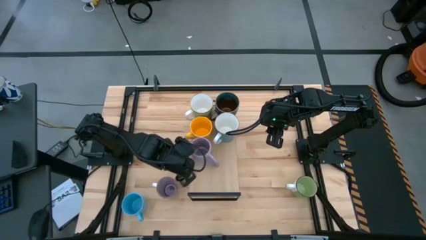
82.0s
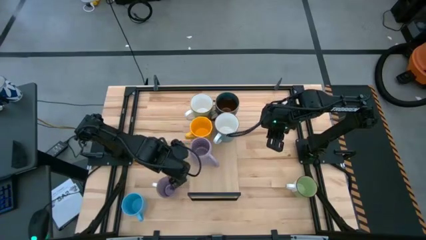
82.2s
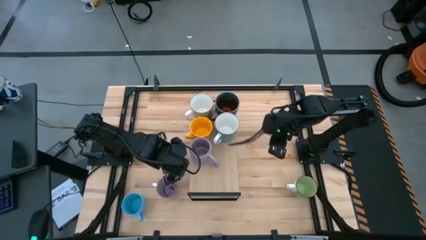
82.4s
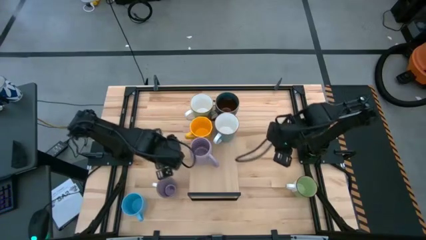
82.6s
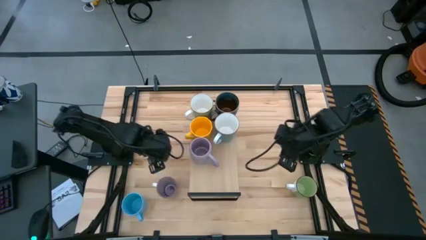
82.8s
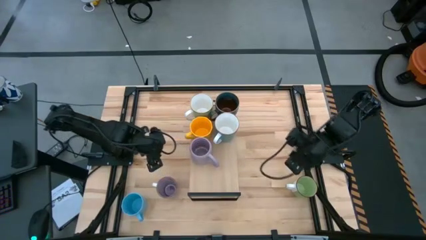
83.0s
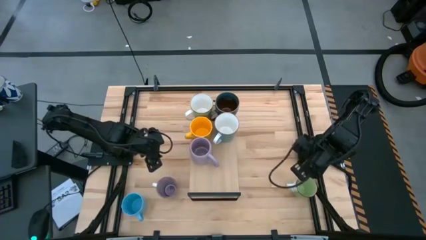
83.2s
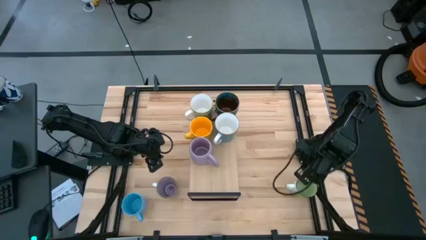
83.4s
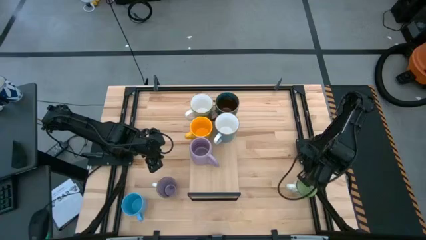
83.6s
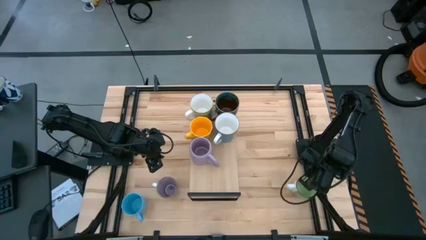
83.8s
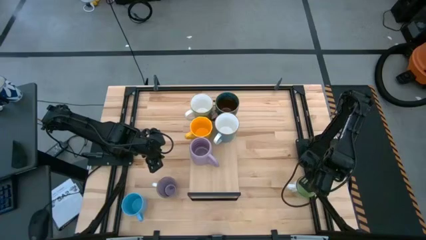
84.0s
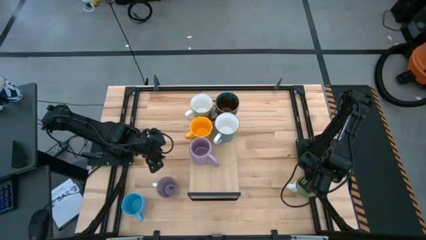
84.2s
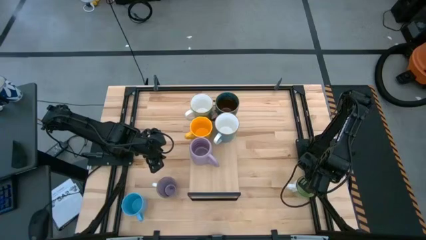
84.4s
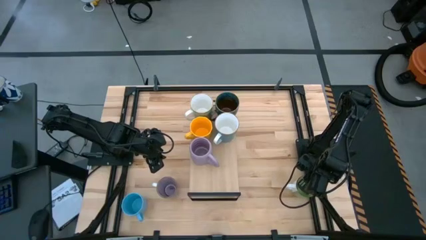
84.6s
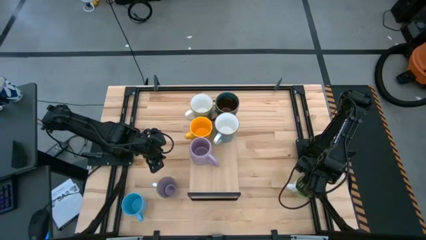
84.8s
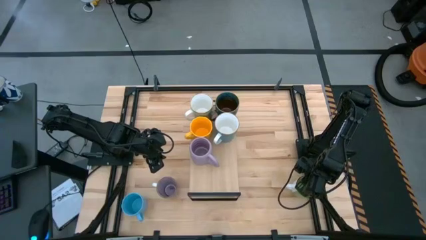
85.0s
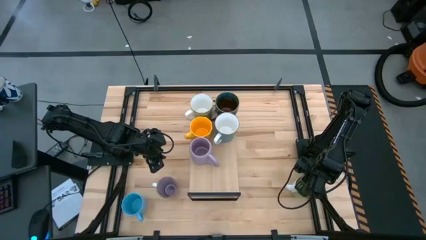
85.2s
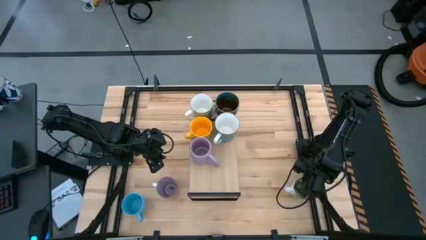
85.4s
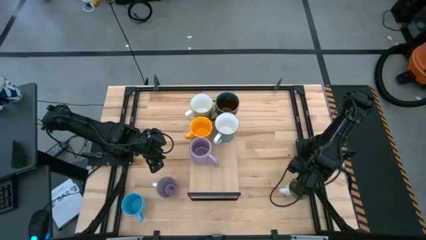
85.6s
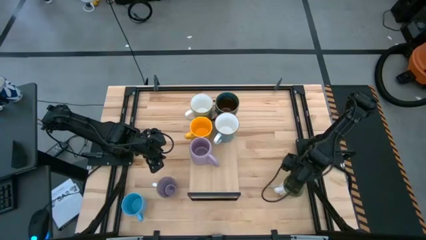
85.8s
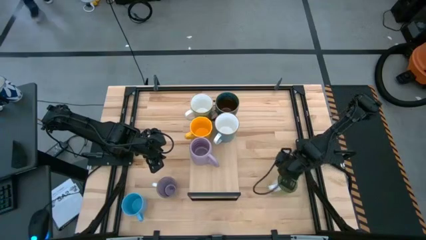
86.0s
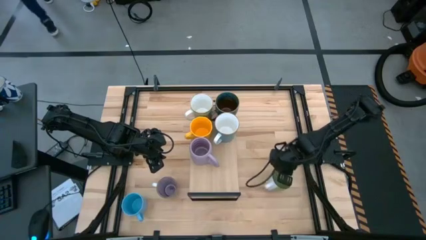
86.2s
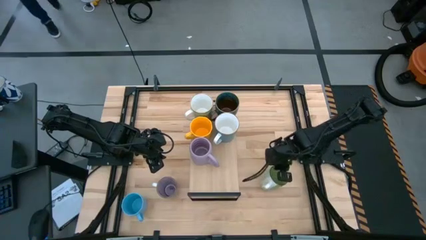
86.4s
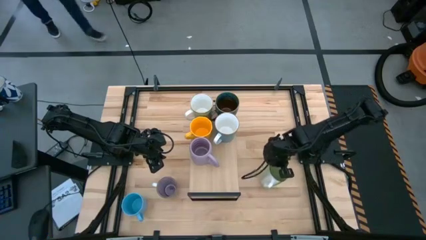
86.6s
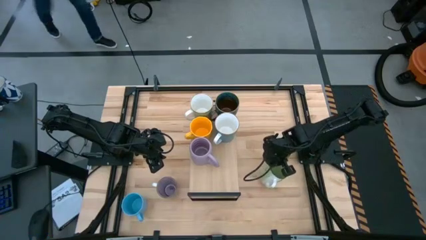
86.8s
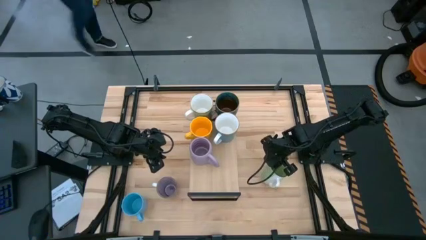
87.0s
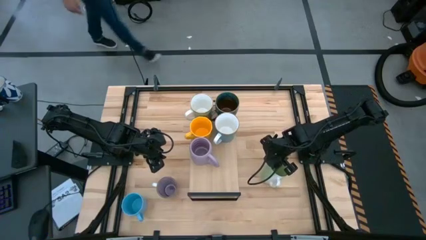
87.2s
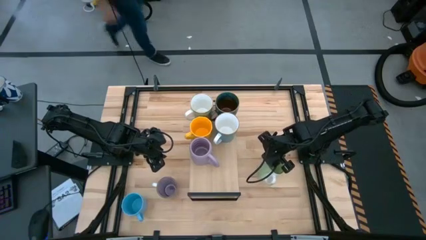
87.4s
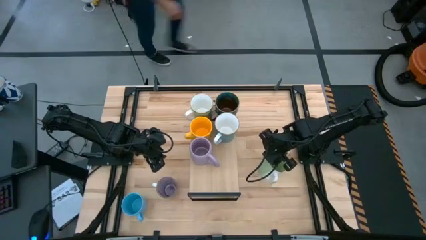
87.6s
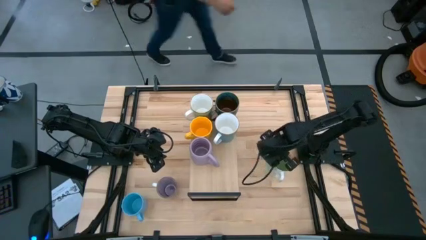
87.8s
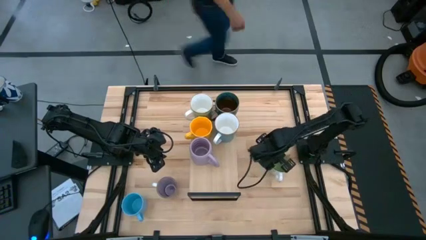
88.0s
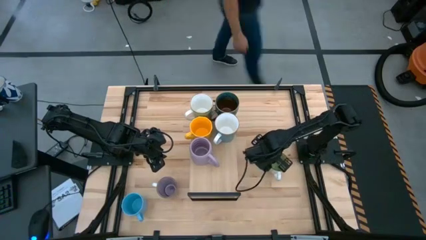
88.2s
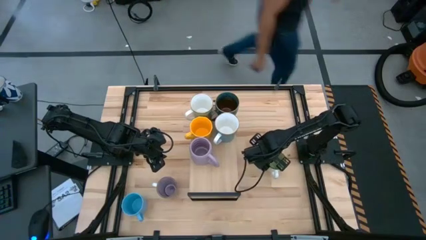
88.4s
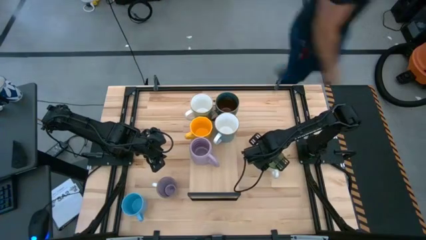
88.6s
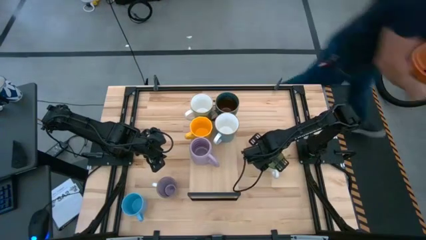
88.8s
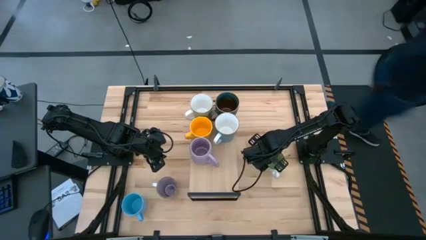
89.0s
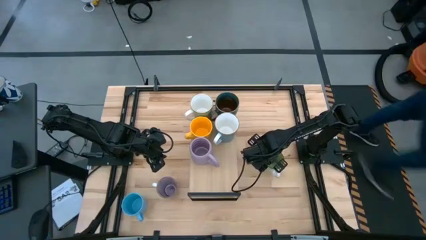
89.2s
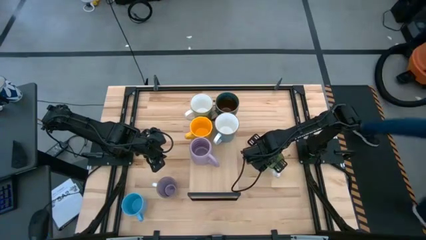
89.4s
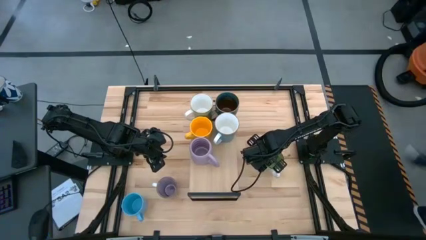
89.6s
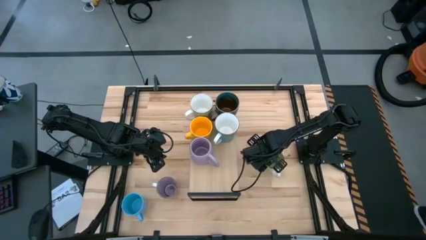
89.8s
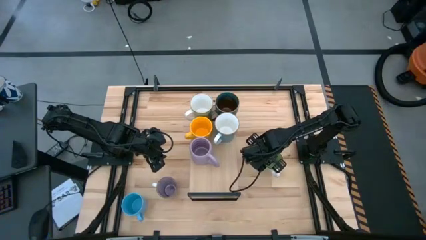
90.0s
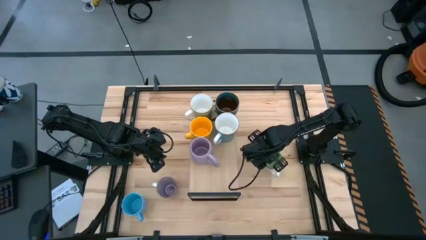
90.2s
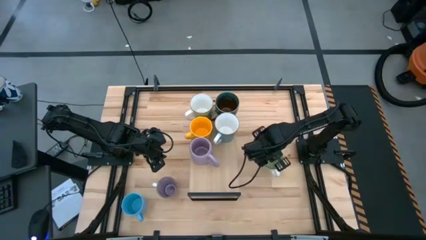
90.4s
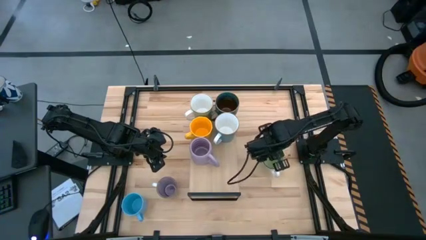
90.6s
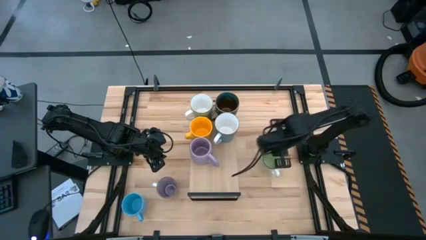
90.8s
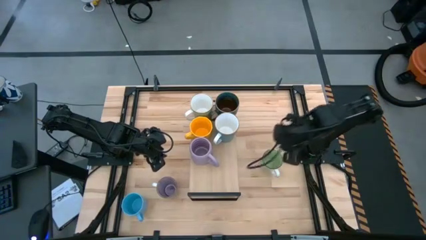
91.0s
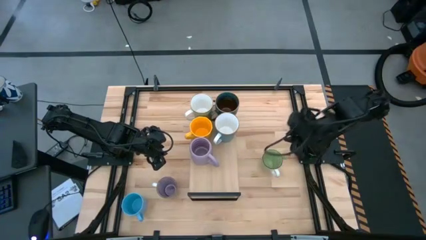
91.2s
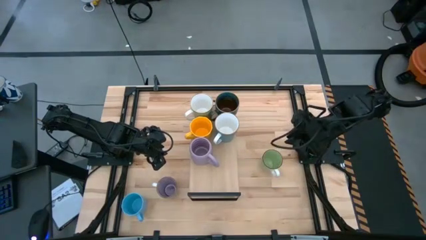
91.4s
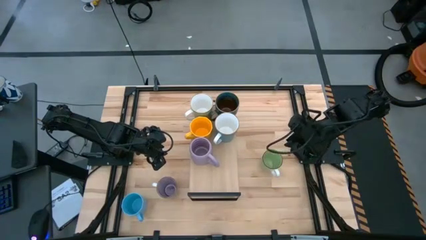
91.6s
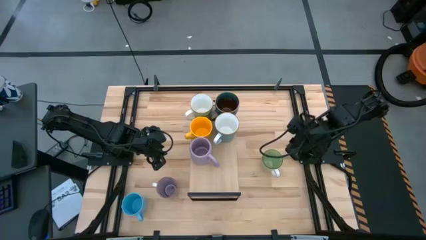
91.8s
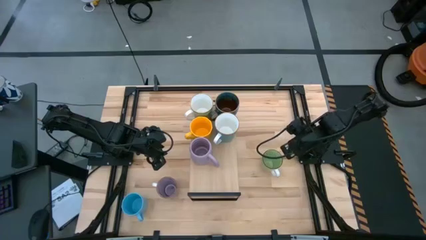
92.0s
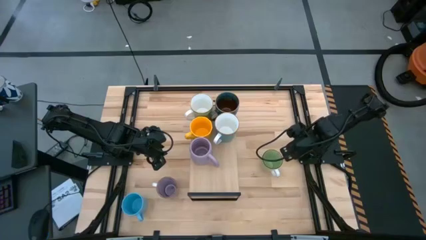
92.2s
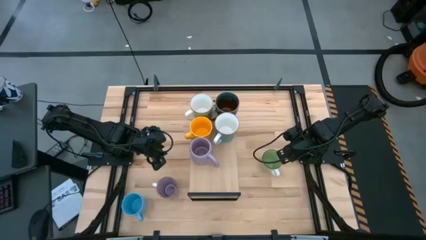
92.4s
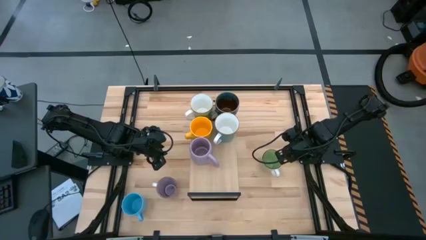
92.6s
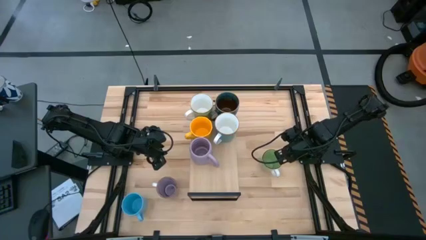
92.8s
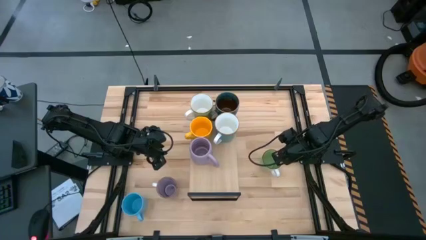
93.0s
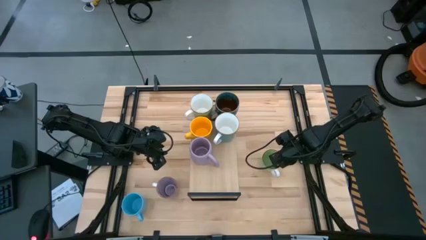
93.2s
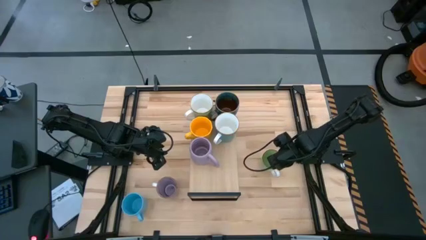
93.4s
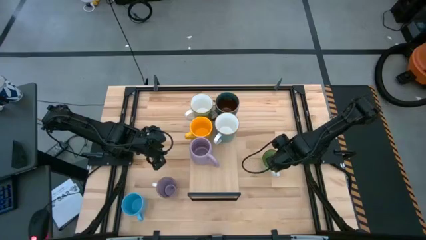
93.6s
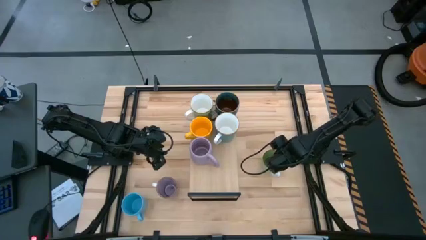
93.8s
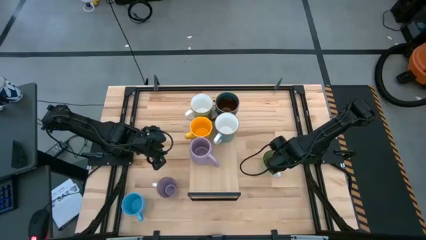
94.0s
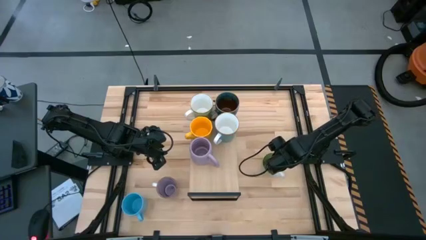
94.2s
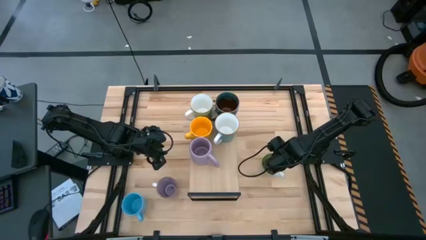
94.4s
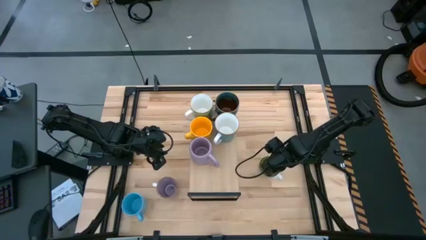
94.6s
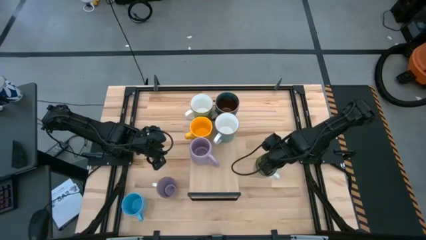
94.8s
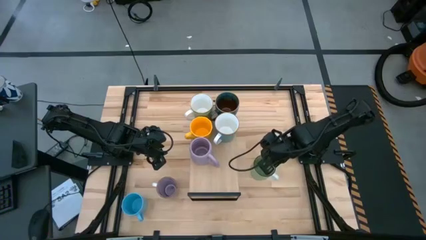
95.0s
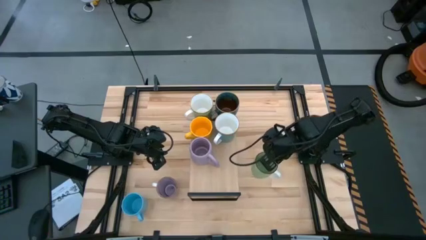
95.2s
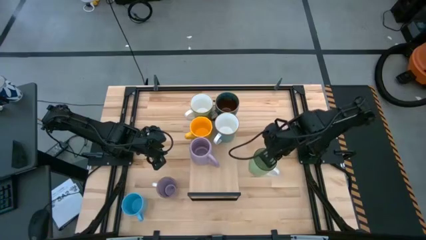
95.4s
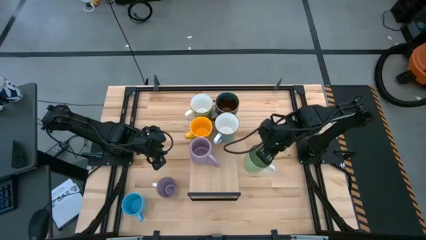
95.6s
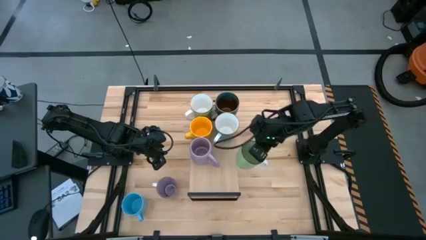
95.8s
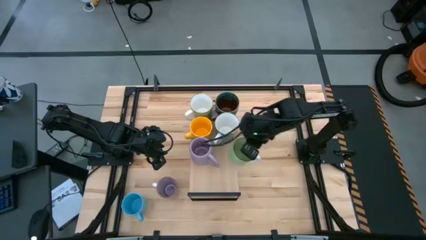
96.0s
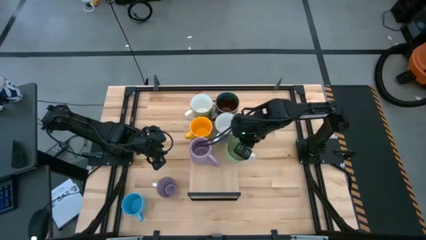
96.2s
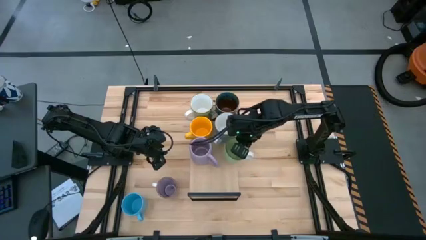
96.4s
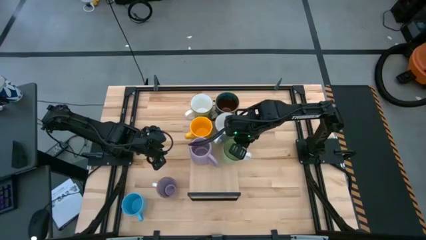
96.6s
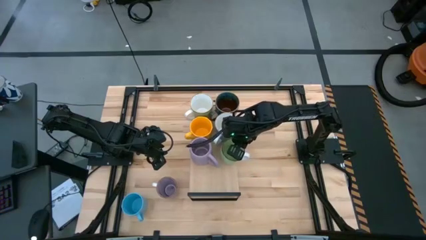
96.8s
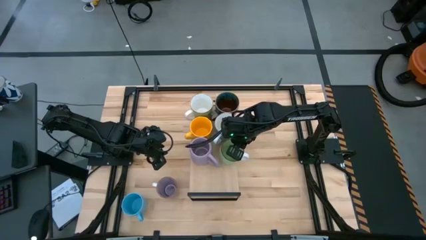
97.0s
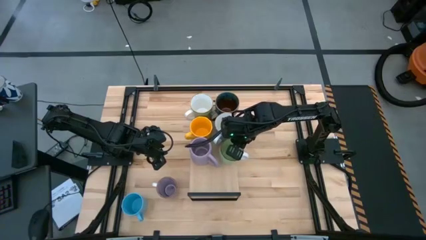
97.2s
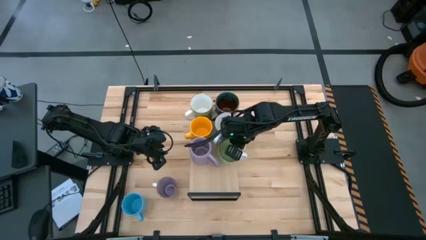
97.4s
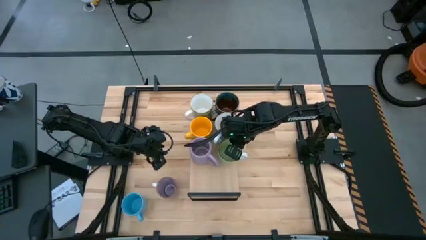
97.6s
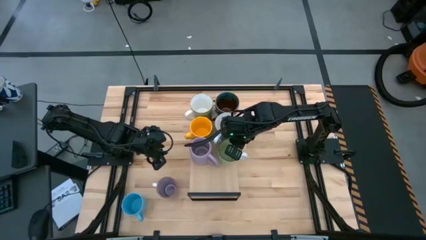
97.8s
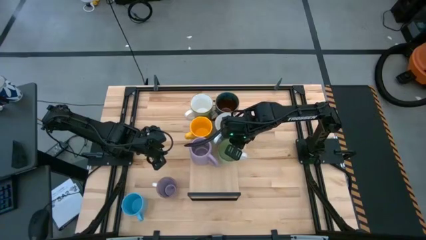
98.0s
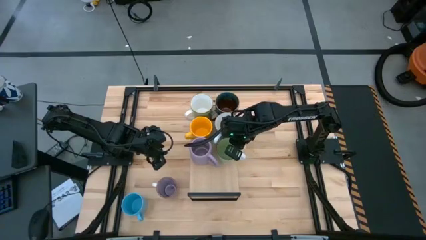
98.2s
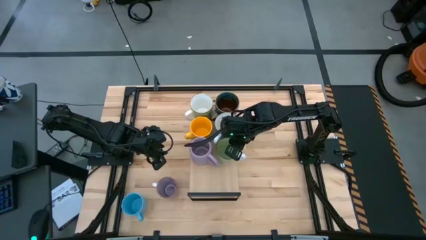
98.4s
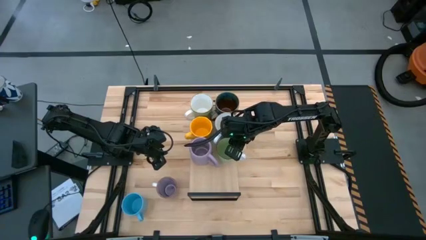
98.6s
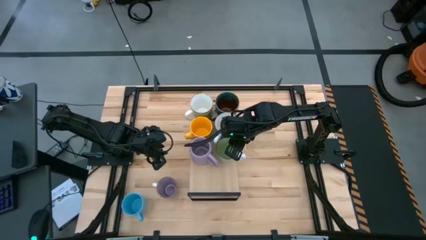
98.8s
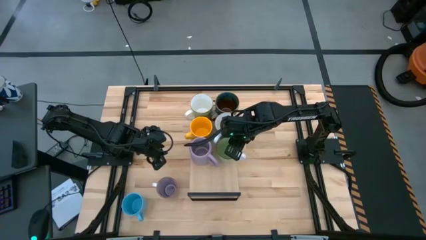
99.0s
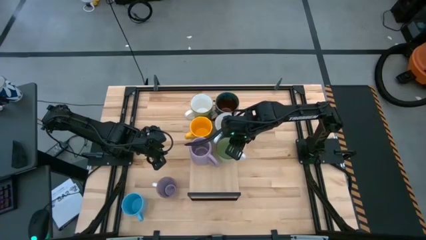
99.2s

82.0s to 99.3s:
Task: Place coffee mugs
Put the light green mug on the shelf
